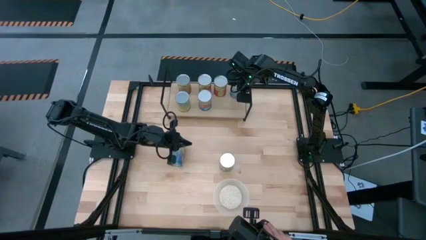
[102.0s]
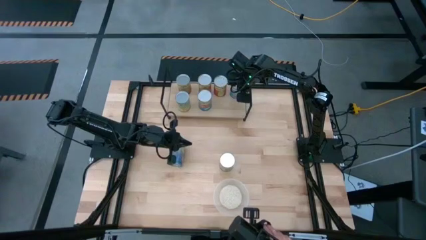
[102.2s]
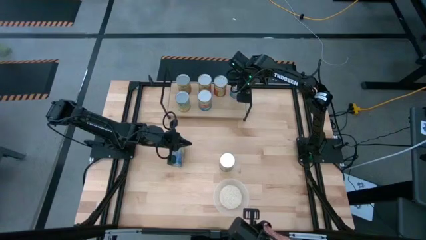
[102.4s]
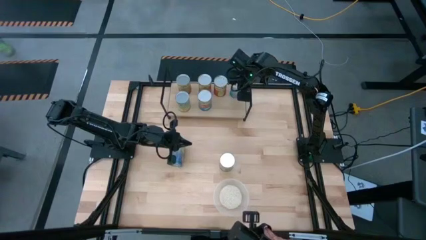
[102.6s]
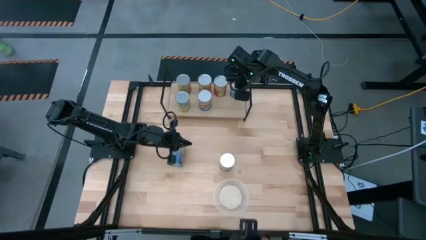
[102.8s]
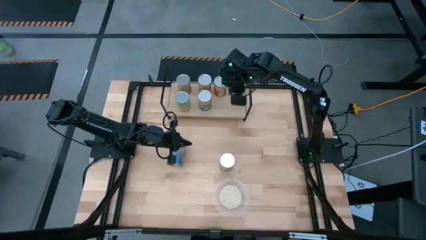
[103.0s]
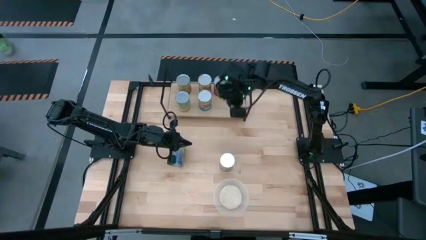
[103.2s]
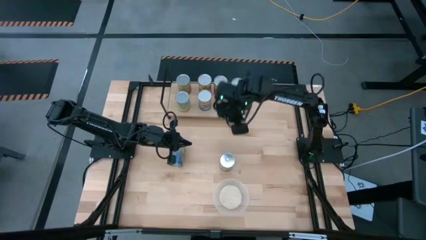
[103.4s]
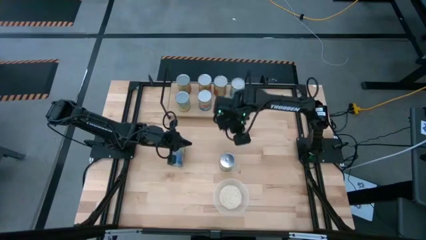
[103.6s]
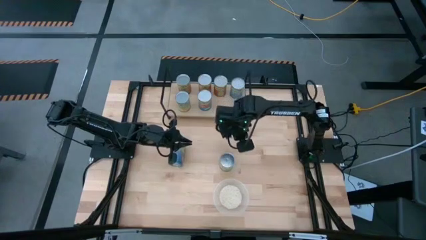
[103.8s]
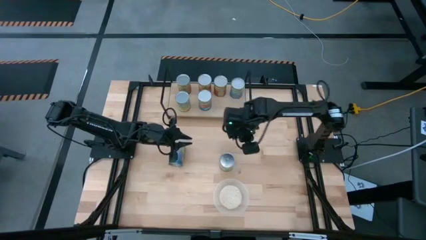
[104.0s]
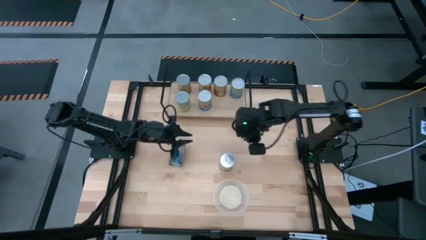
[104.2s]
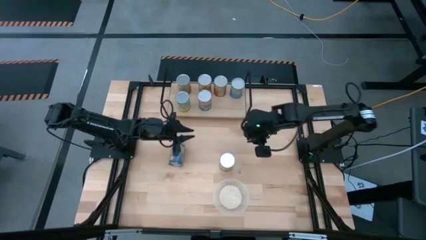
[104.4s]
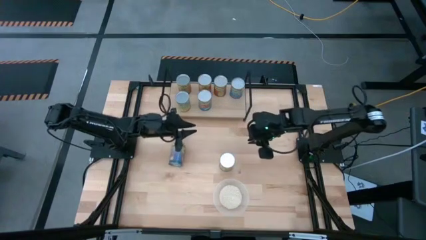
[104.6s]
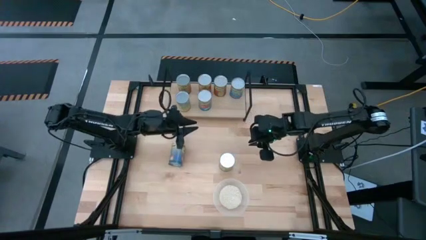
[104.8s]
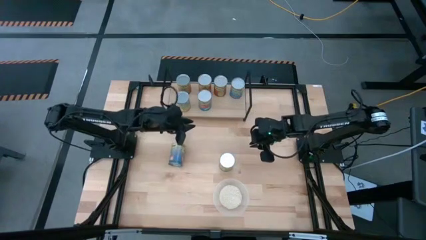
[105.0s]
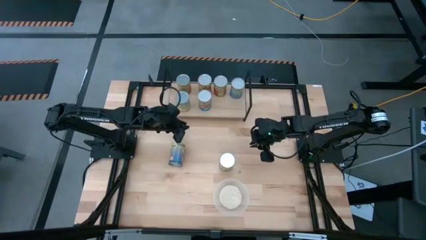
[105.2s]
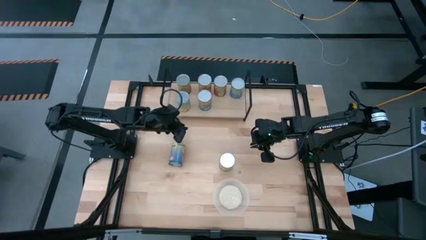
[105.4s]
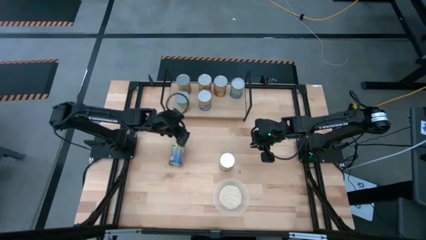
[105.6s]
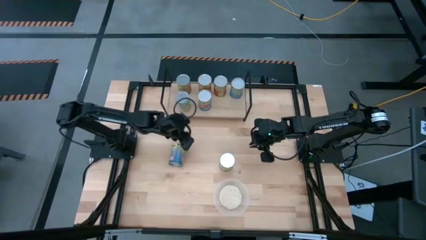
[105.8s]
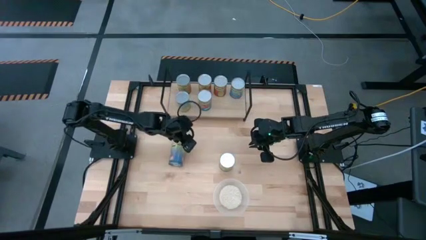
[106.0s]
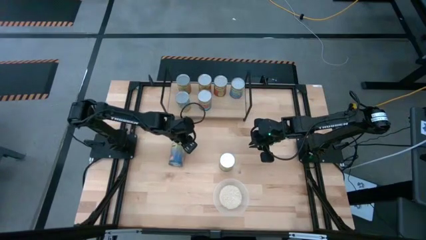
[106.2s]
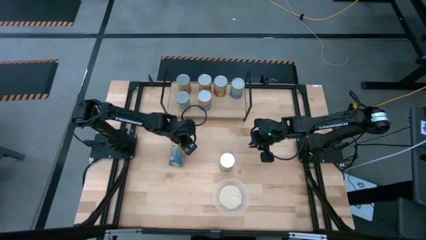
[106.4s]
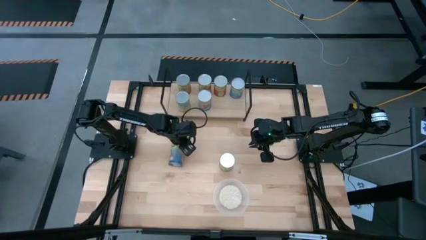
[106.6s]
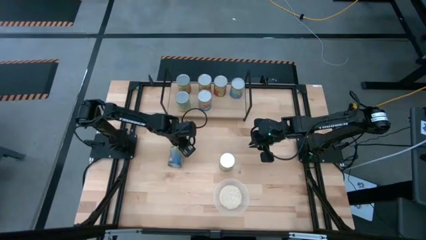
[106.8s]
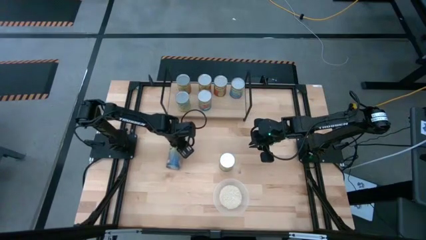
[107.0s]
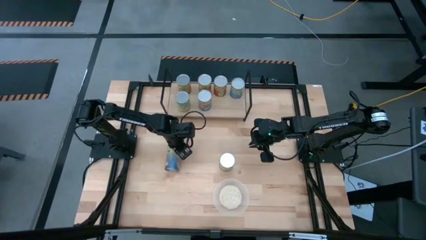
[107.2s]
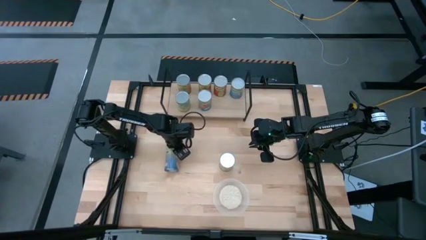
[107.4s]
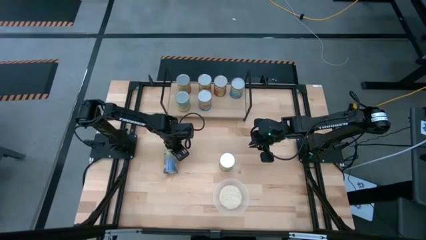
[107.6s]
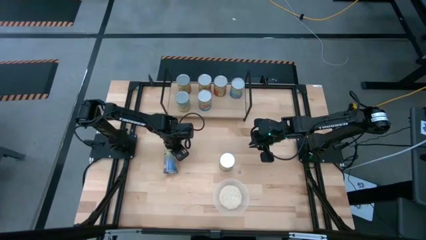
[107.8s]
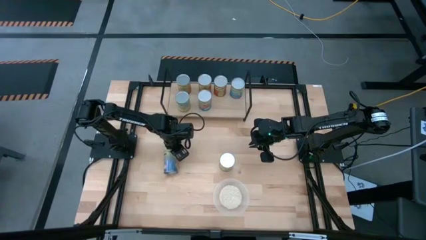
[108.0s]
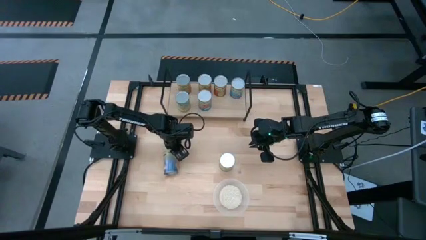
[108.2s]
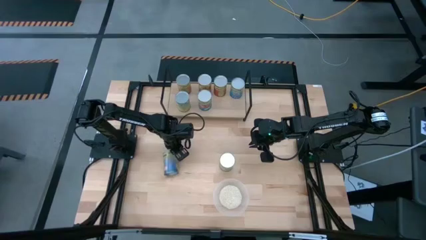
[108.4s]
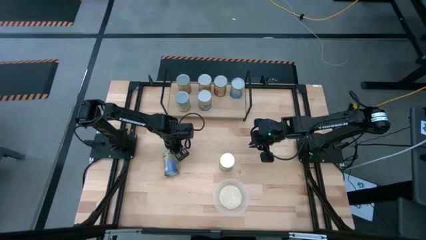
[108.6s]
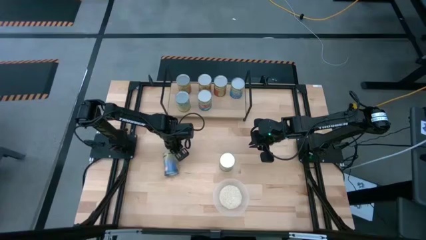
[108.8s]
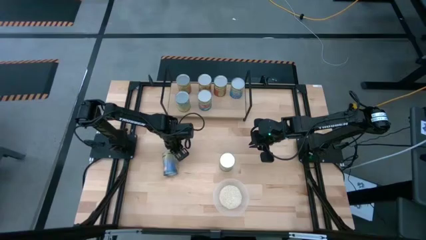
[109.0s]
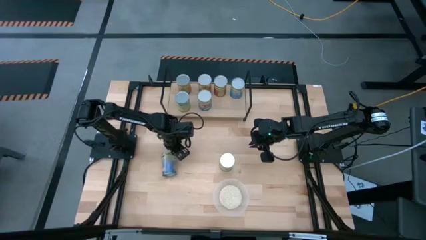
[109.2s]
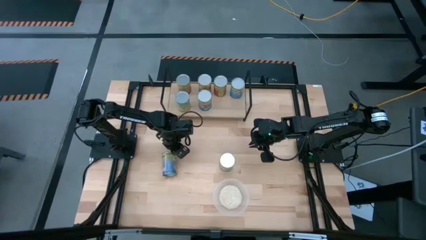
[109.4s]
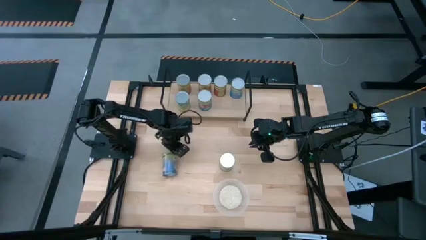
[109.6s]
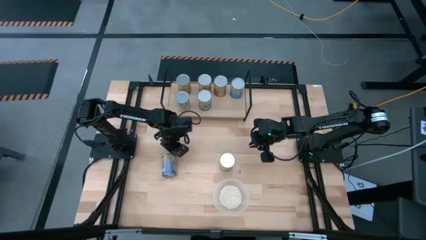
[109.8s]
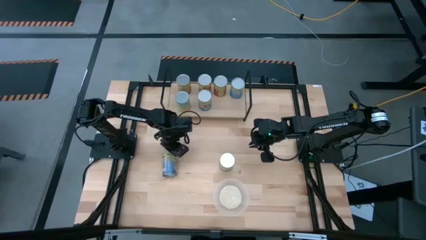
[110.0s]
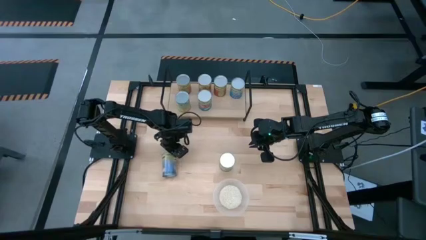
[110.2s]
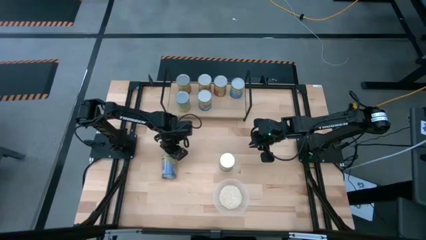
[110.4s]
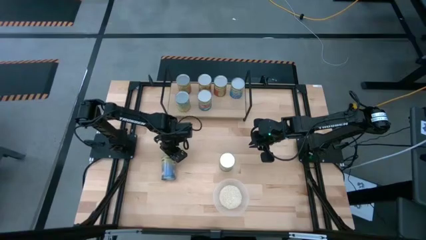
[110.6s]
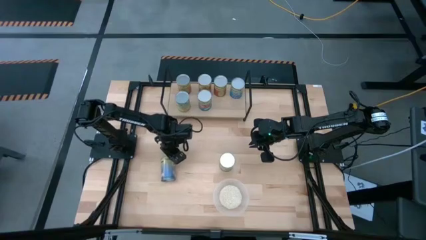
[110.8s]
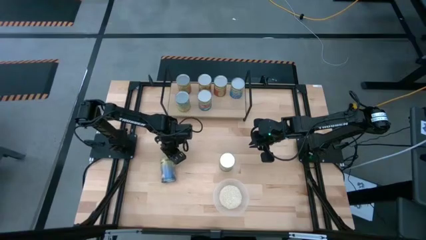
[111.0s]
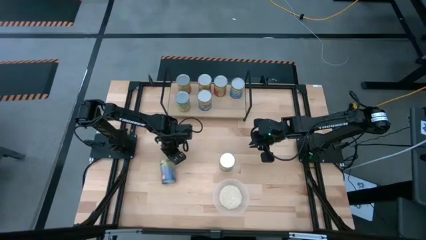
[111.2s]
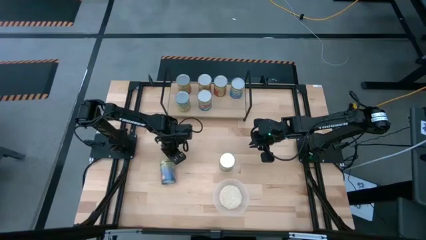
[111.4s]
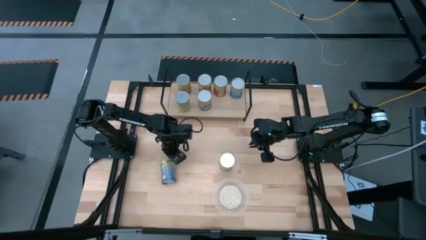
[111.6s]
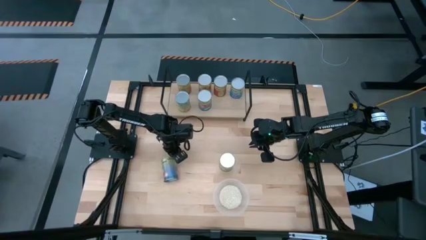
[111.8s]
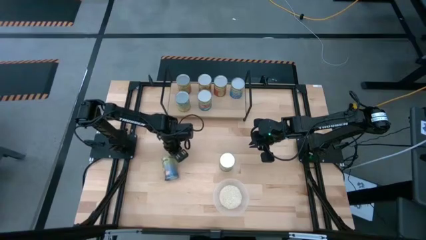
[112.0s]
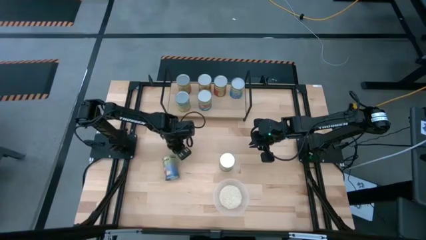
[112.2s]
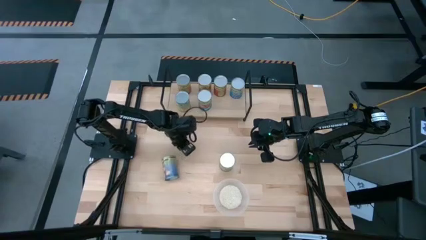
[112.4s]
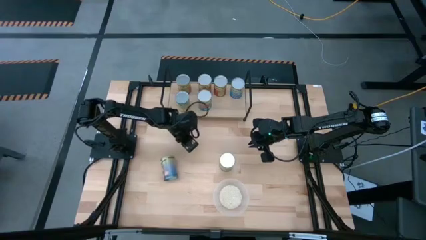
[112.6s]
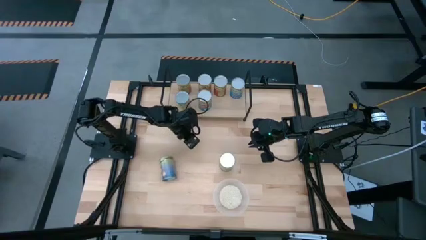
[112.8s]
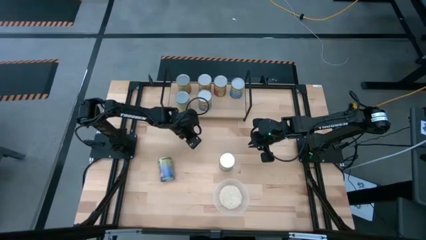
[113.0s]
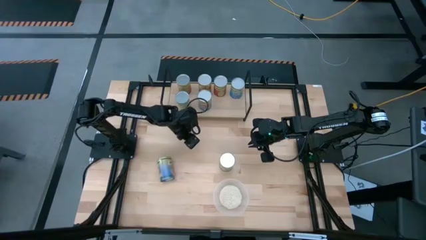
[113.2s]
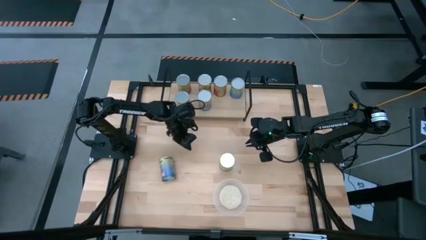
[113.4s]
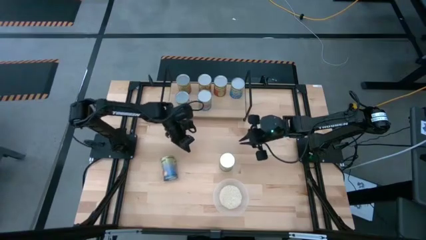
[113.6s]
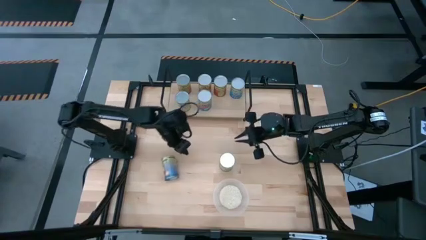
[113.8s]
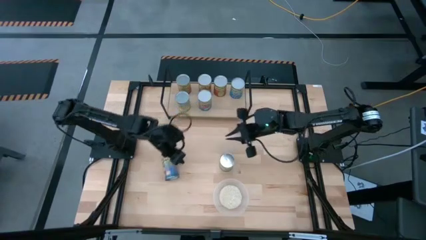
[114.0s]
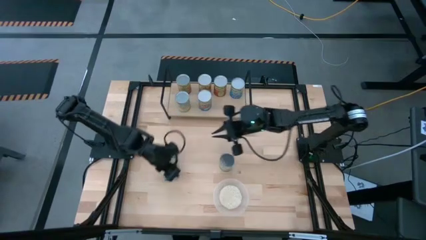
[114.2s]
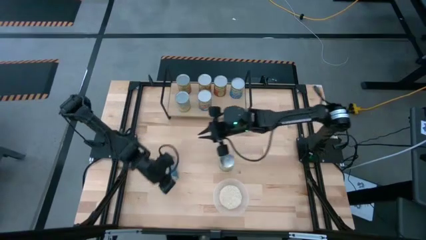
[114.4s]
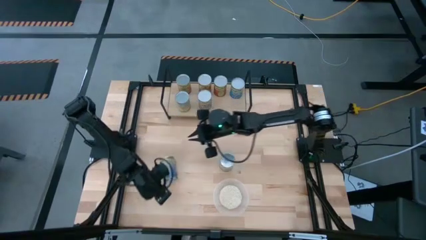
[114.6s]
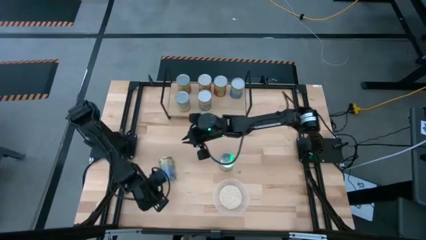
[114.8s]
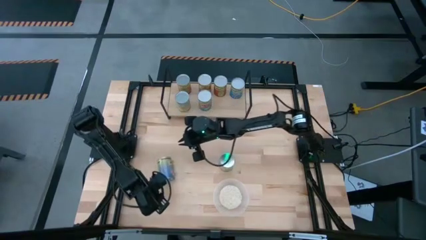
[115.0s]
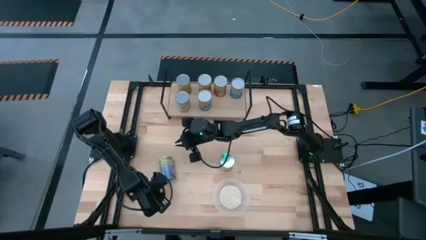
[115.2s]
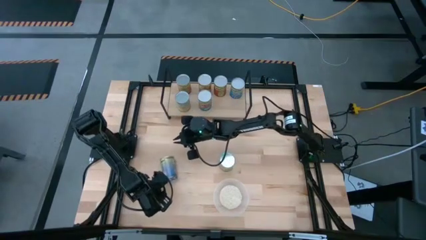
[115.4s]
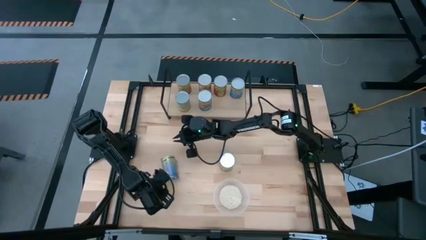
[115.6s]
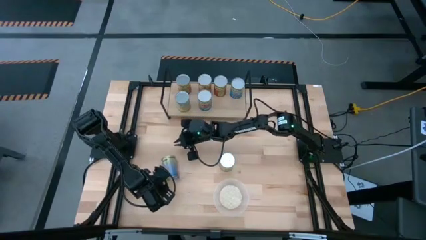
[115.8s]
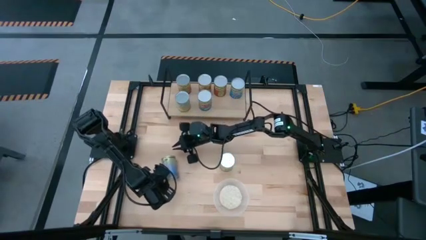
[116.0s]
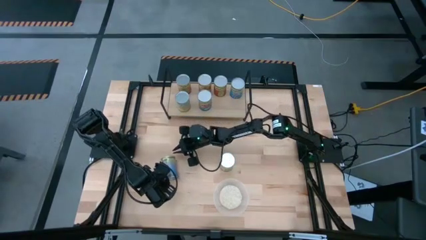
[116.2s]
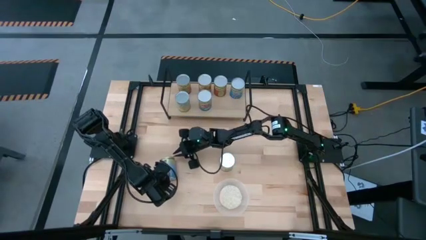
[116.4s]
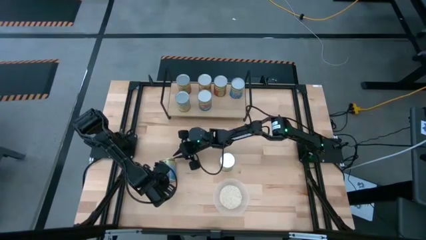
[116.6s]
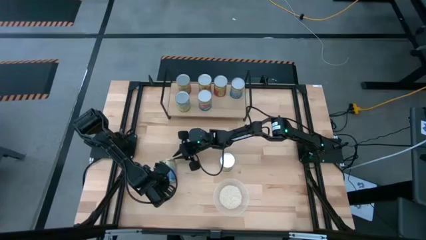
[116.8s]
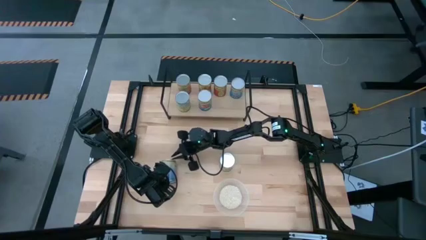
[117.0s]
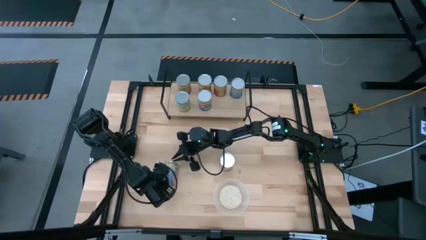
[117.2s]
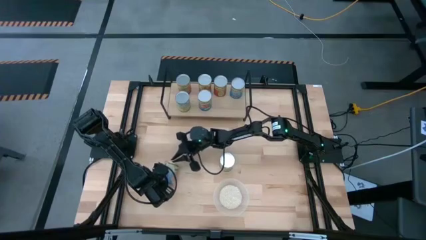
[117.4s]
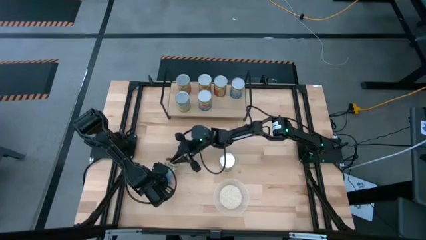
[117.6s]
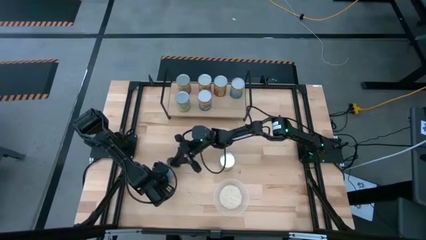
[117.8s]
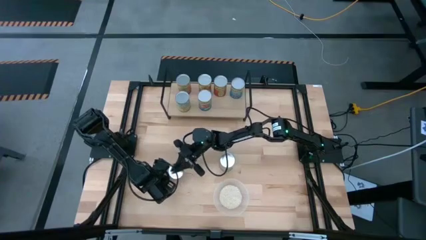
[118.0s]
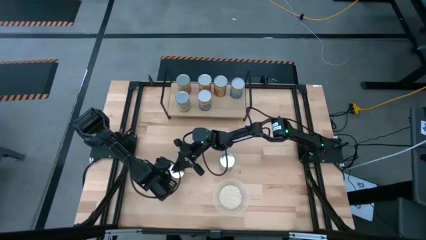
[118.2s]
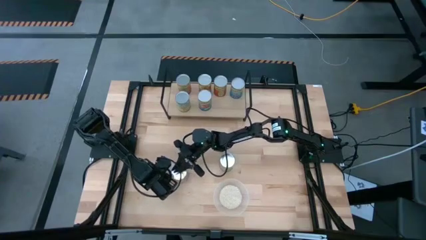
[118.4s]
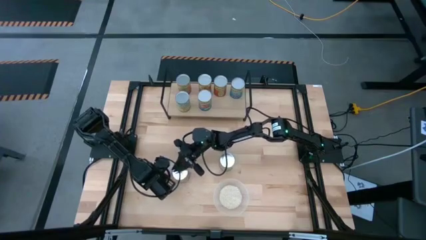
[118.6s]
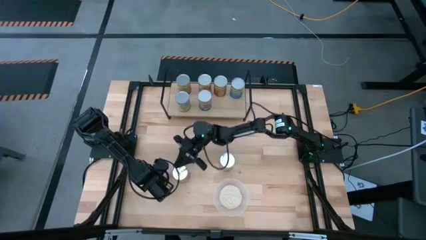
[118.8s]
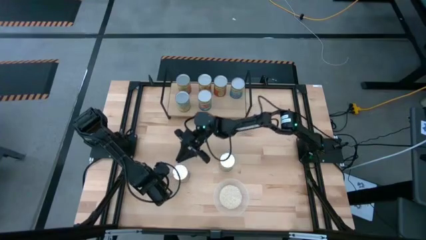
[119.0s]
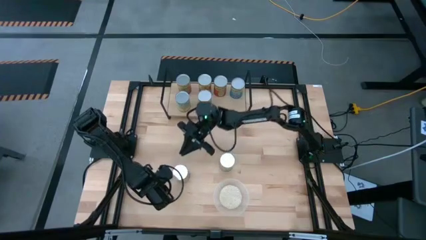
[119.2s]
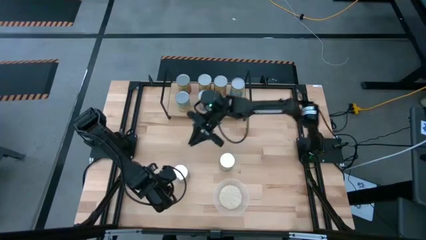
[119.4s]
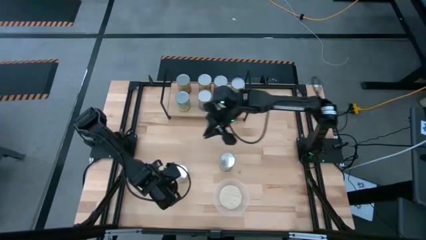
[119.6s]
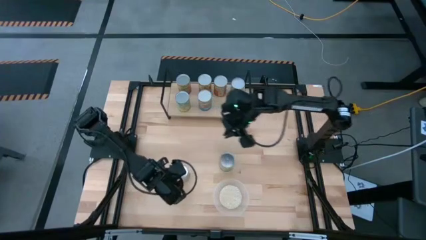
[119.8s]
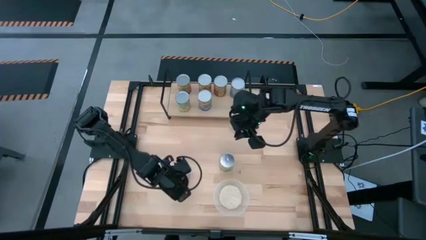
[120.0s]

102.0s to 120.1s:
Task: Pick and place cans onto a shelf
Put the canned peaches on the shelf
